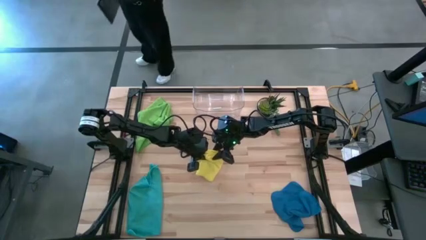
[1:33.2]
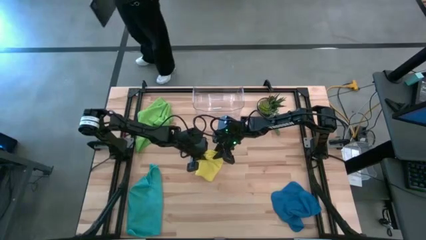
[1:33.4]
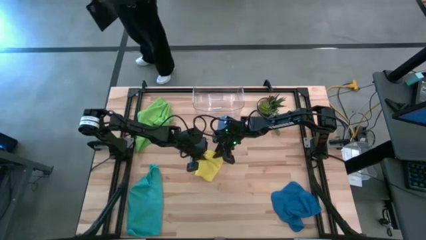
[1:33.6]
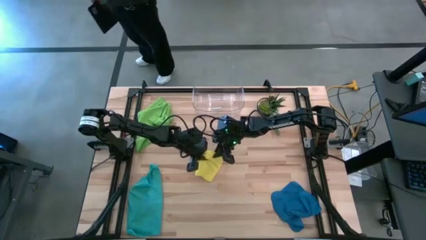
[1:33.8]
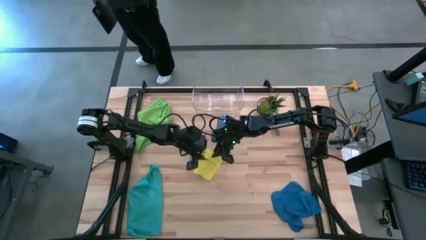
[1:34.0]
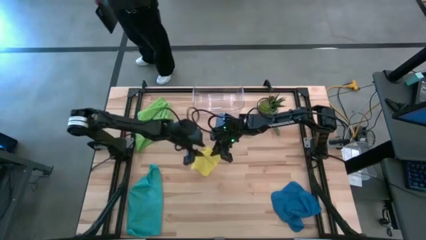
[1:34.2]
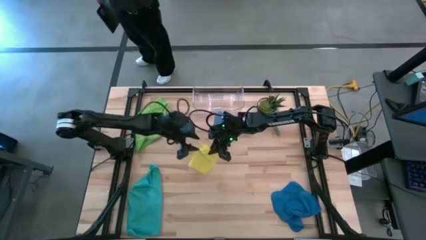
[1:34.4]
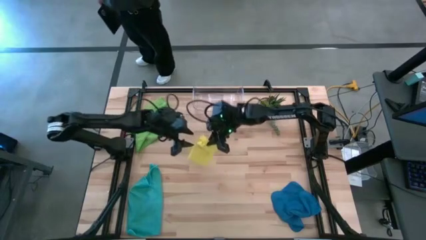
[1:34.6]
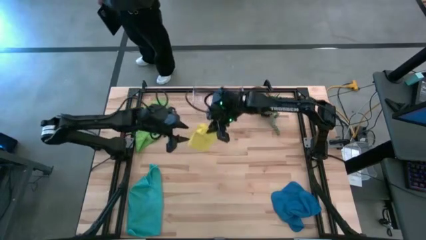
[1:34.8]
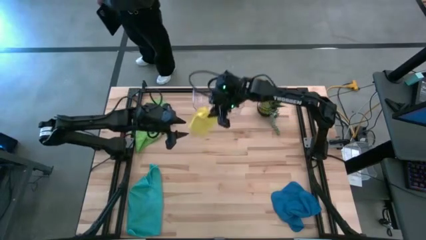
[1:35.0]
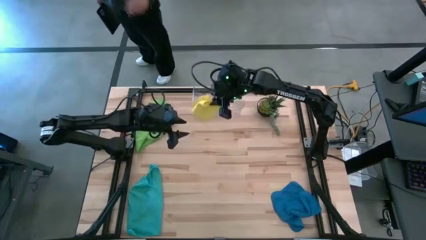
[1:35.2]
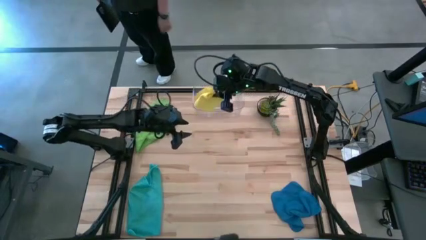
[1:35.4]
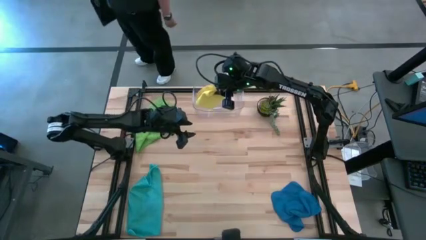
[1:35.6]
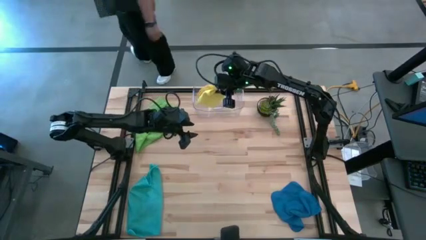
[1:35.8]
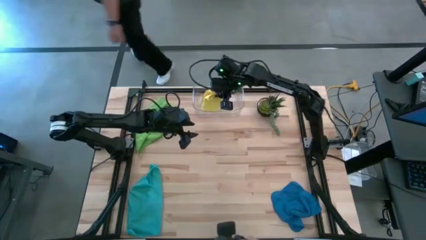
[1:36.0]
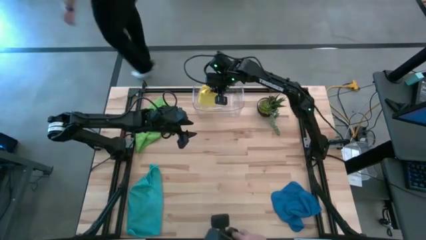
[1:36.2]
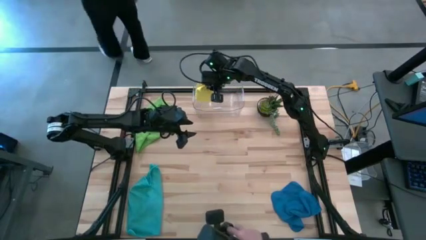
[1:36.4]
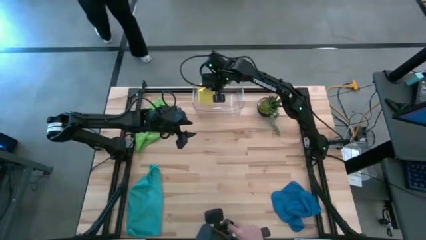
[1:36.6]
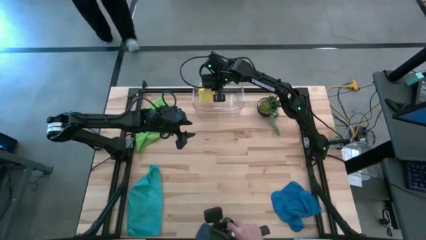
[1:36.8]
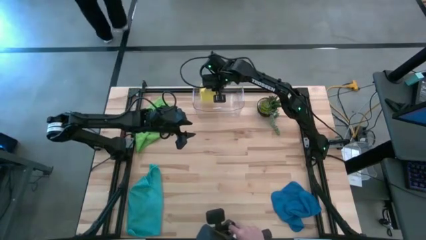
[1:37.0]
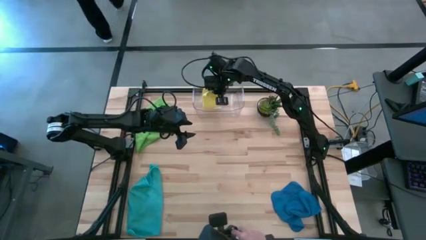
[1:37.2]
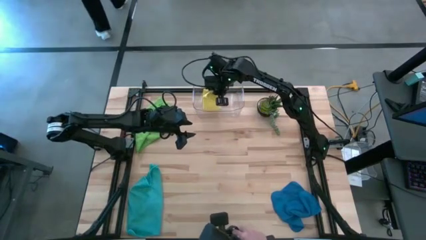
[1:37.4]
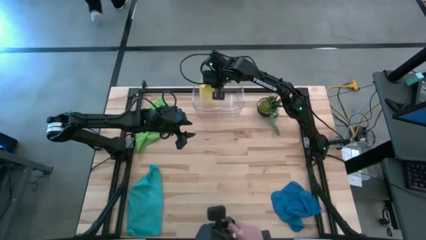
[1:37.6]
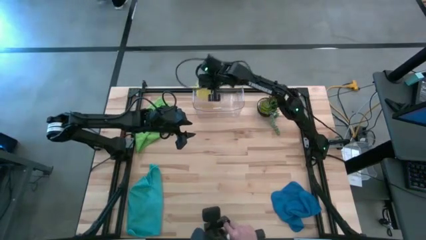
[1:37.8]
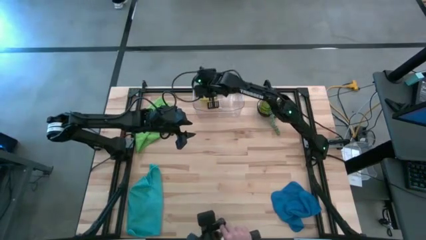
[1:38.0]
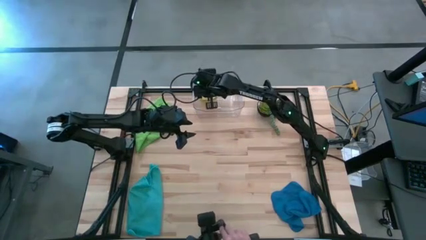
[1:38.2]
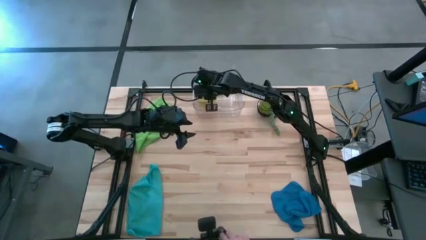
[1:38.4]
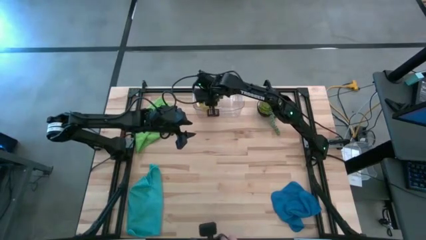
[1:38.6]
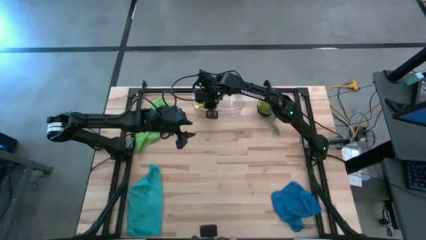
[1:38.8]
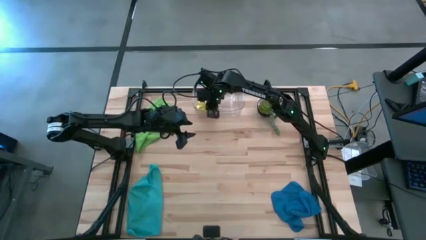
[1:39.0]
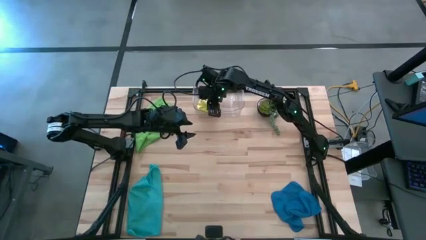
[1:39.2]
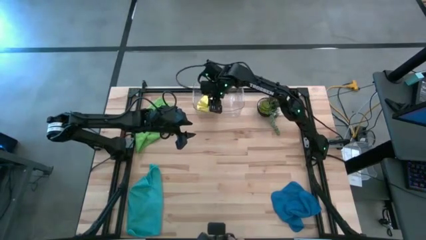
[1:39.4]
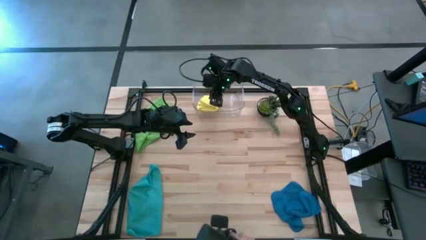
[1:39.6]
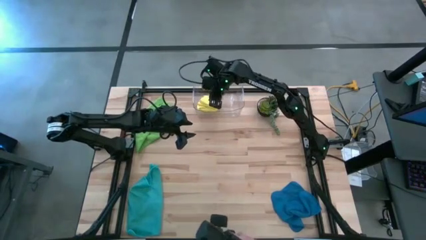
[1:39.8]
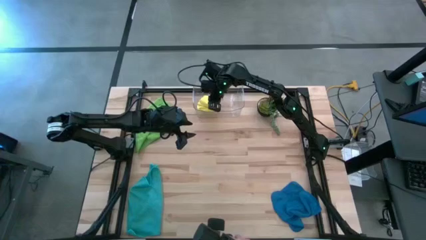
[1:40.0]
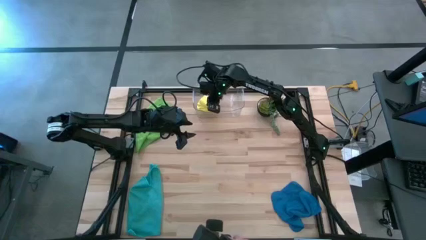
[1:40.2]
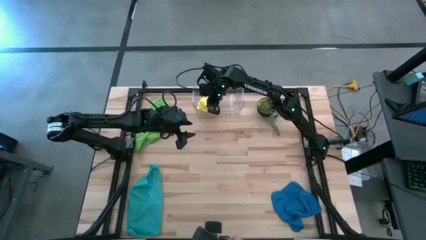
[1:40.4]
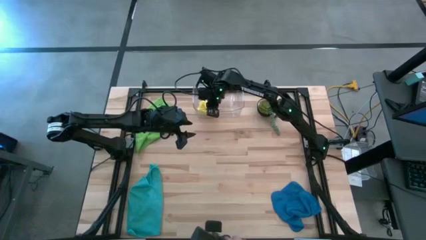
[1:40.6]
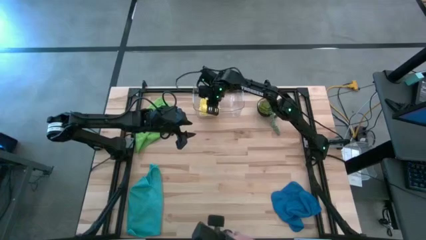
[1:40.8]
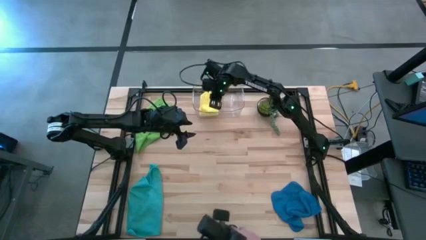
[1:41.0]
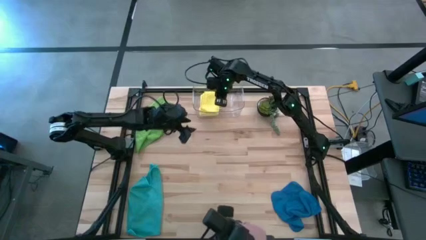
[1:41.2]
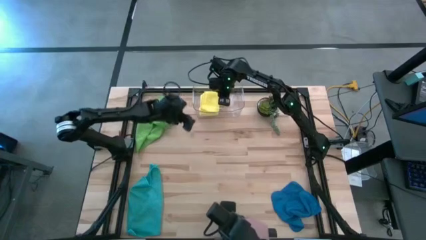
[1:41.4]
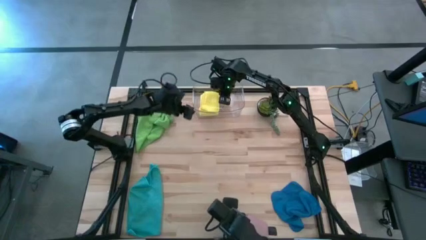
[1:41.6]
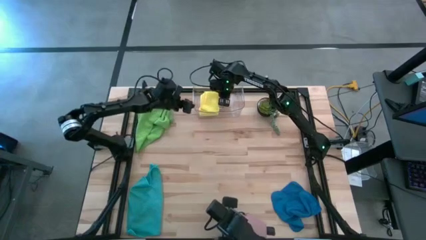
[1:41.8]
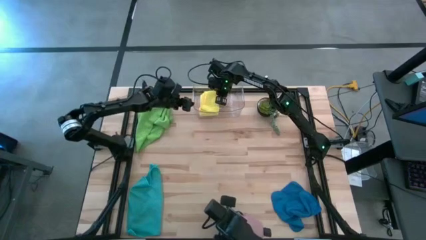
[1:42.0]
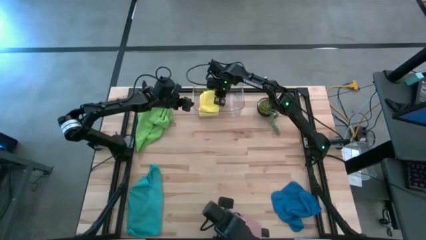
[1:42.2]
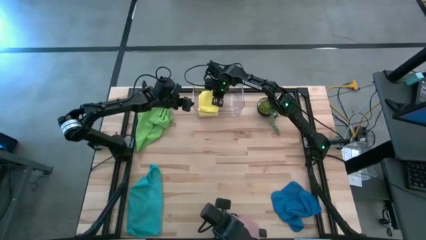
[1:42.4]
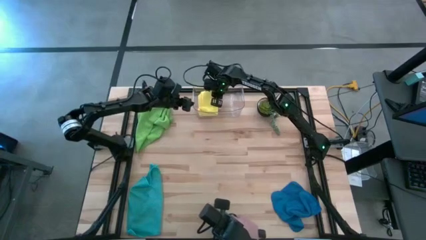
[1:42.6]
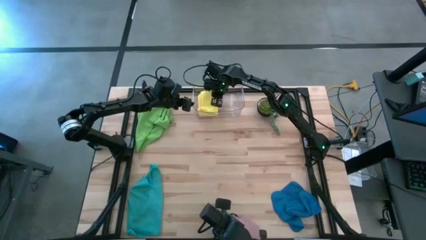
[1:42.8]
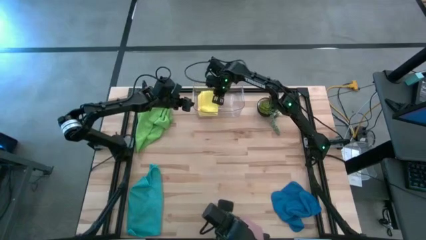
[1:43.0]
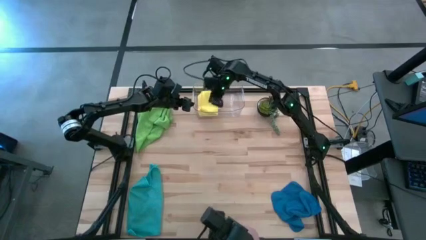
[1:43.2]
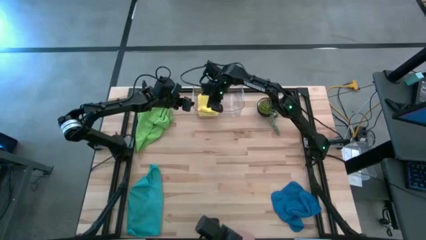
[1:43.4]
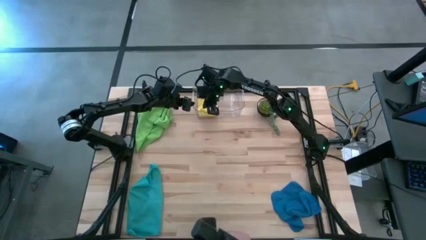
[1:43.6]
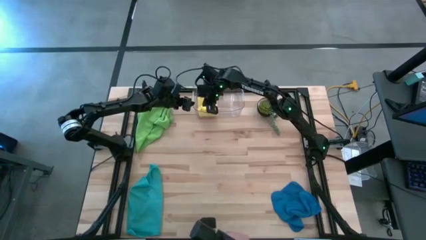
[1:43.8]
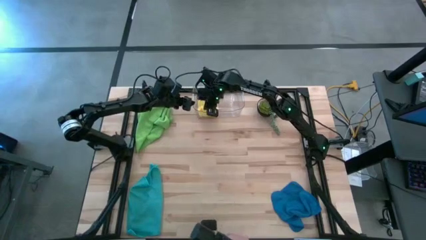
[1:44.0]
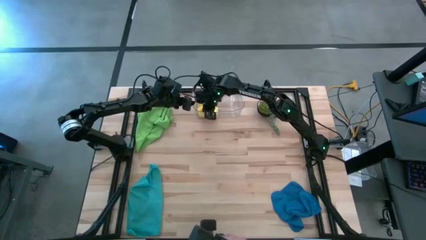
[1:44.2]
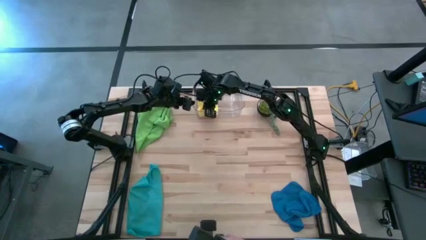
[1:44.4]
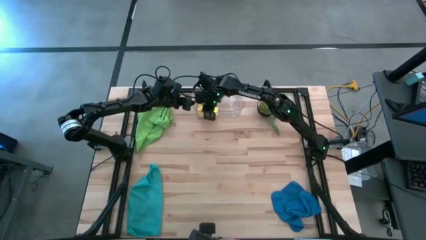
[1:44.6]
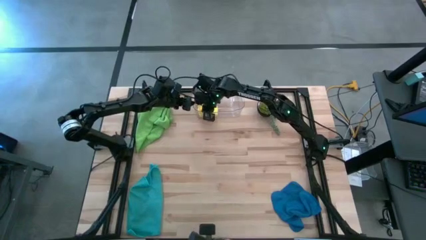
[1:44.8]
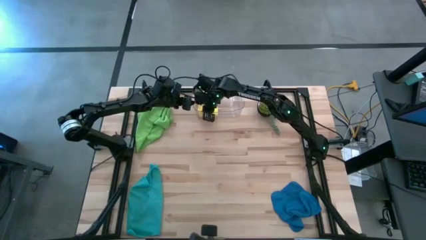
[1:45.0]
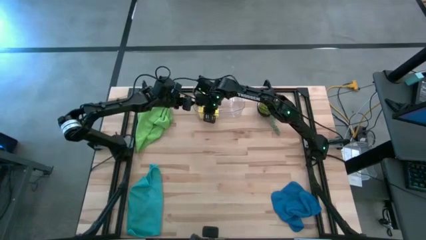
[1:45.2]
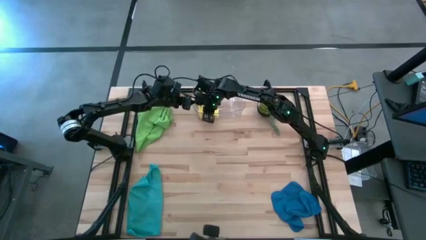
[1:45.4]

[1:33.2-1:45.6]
Task: Fold microfiber towels
Put the yellow microfiber towel into the transparent bin

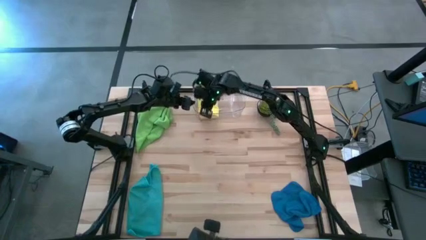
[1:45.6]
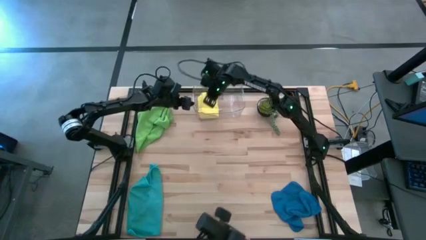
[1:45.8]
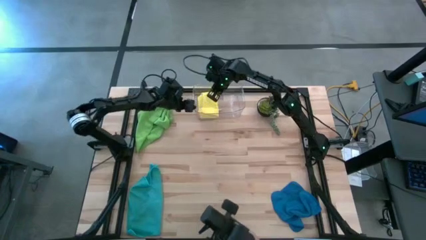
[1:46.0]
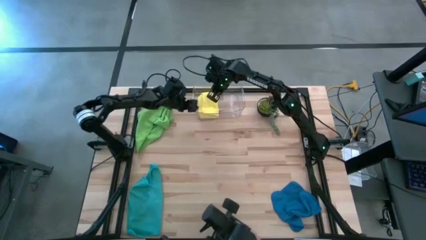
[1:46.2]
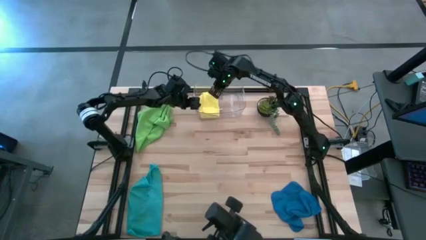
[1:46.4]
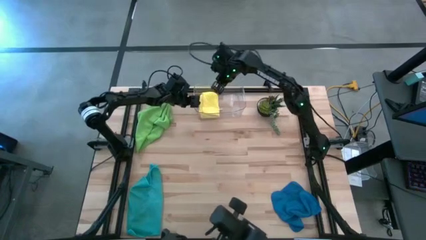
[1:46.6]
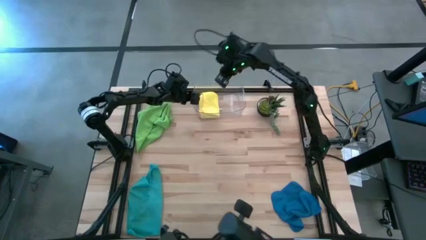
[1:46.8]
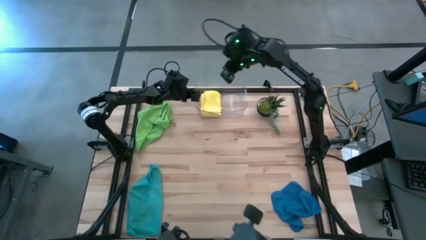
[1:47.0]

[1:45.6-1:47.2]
Adjust the transparent bin

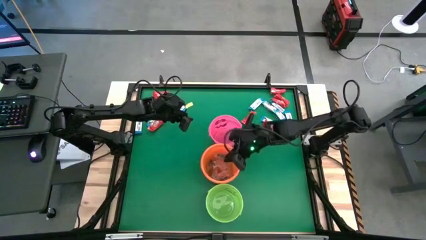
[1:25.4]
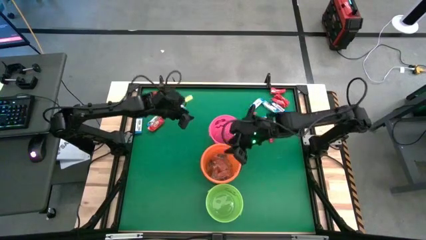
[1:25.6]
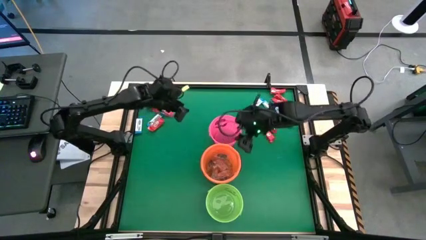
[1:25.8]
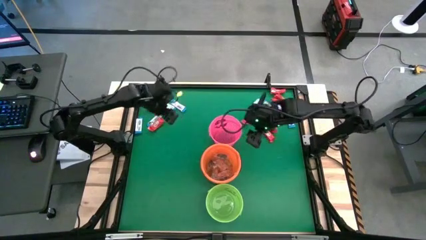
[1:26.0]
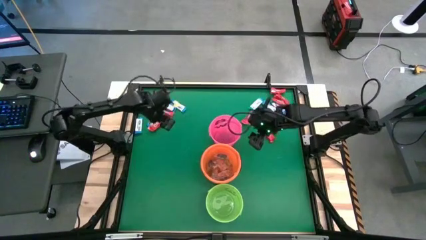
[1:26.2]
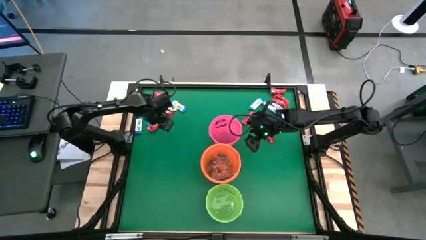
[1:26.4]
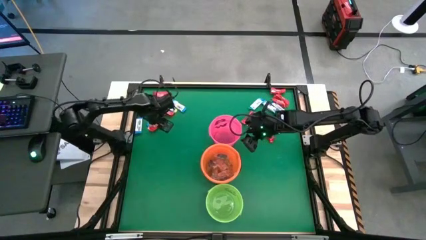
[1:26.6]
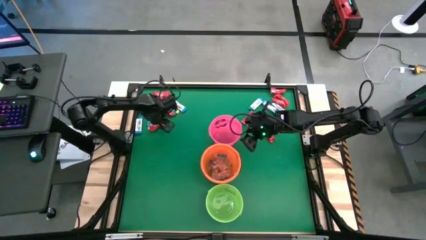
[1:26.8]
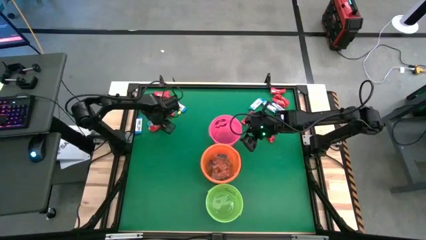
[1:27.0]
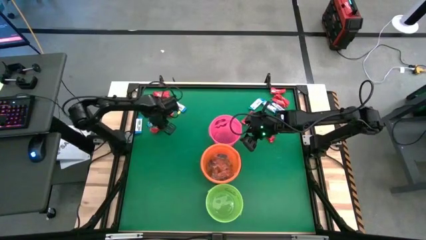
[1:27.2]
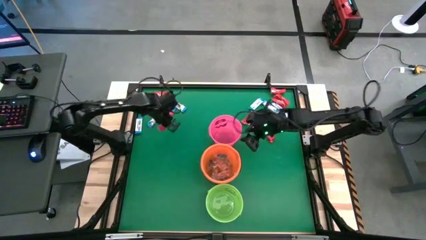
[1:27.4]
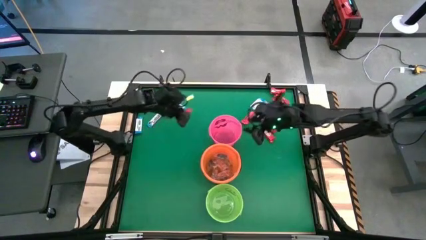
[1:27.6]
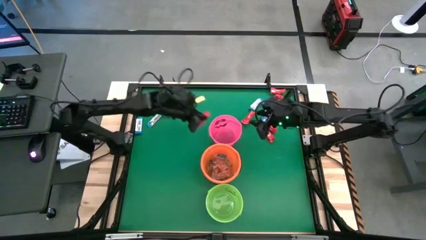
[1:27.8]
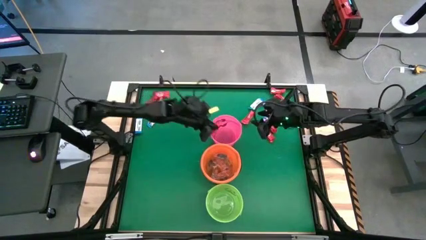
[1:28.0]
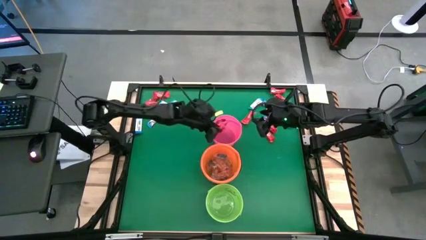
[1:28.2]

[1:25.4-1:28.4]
Task: Sort candy by brand, put in halloween buckets
Put the red chocolate into the pink bucket

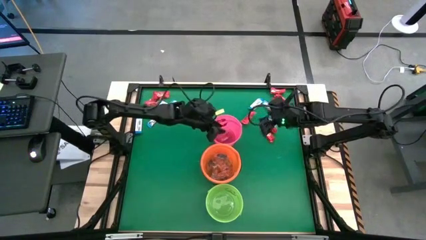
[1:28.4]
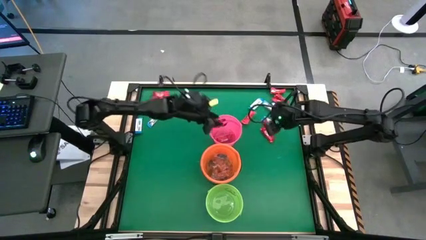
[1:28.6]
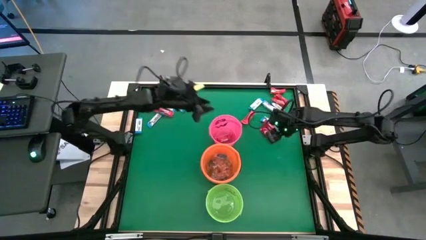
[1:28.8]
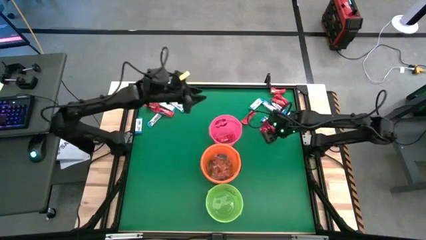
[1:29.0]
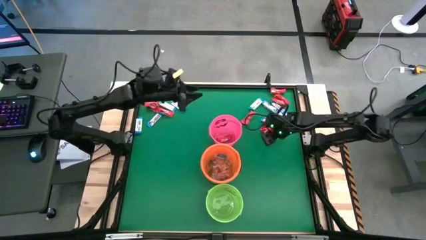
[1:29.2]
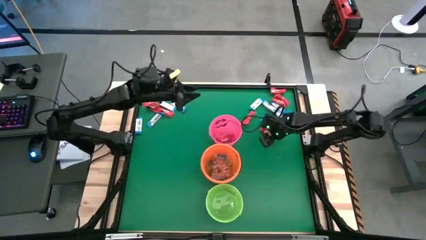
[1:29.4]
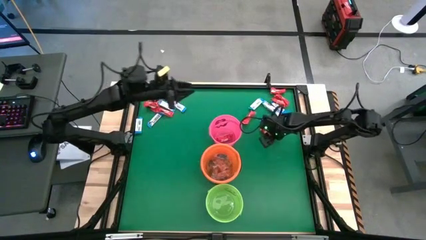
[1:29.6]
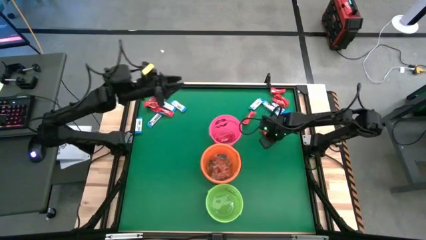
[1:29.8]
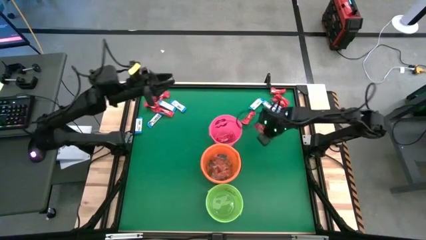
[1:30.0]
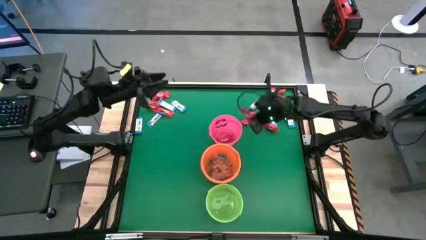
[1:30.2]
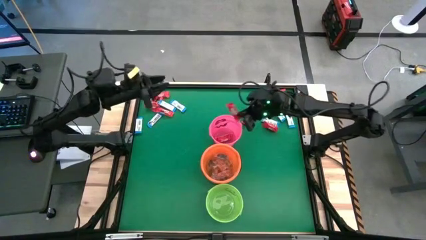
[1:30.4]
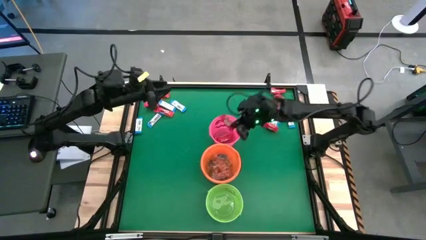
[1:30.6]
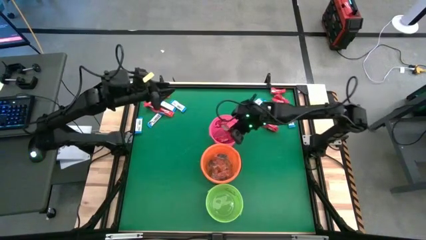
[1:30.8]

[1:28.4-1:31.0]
Put the red chocolate into the pink bucket
